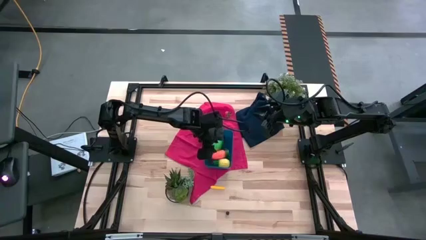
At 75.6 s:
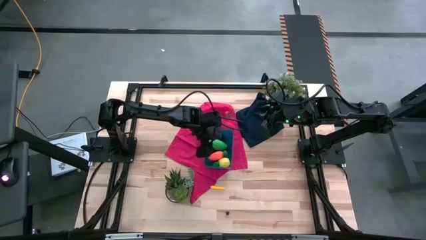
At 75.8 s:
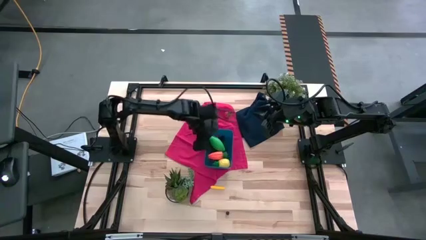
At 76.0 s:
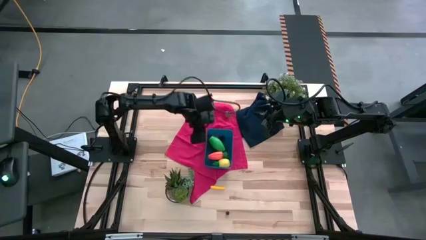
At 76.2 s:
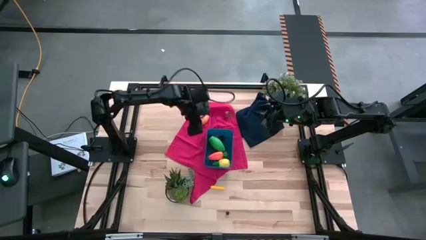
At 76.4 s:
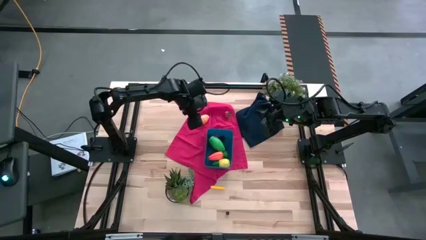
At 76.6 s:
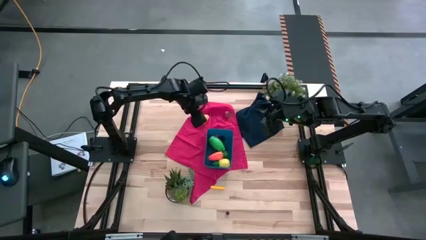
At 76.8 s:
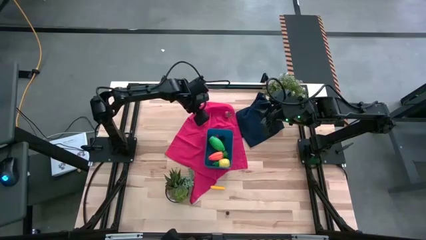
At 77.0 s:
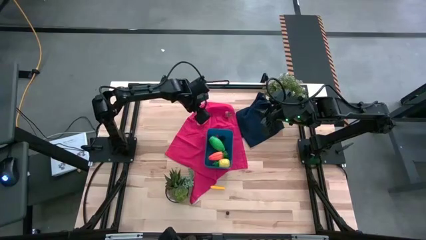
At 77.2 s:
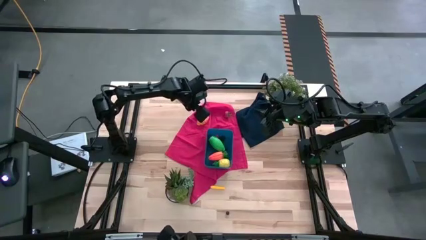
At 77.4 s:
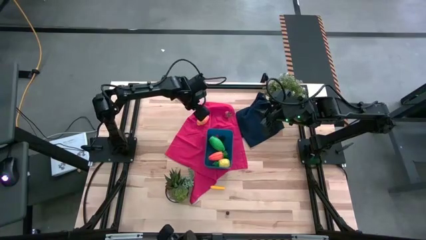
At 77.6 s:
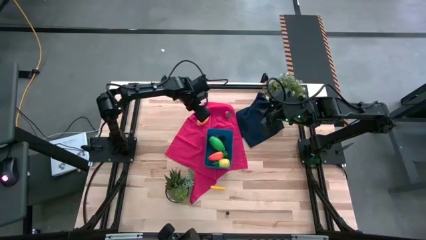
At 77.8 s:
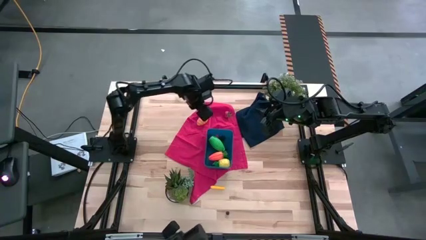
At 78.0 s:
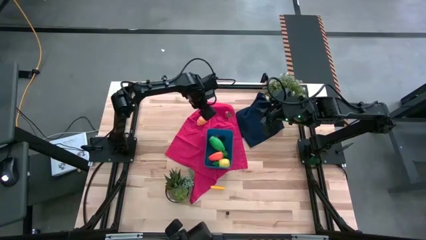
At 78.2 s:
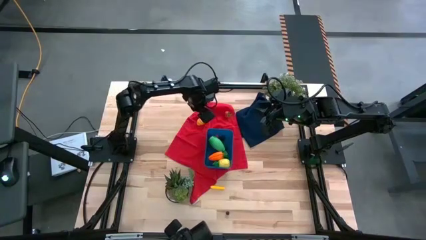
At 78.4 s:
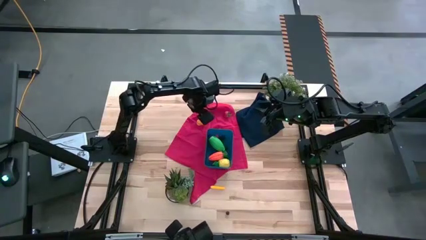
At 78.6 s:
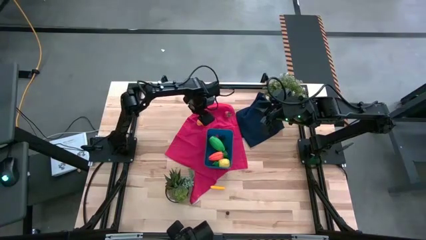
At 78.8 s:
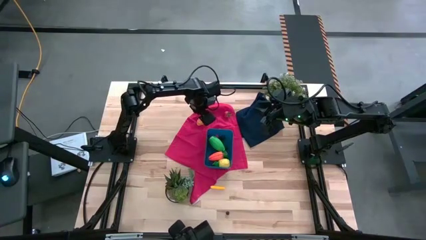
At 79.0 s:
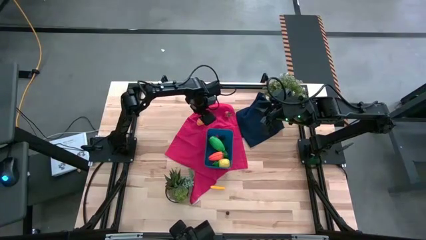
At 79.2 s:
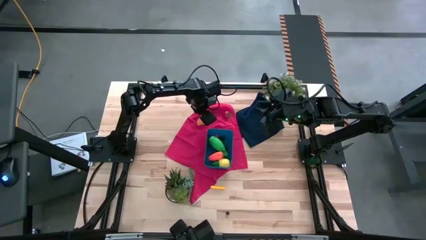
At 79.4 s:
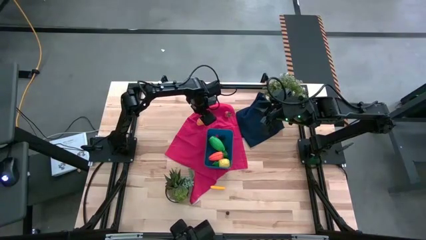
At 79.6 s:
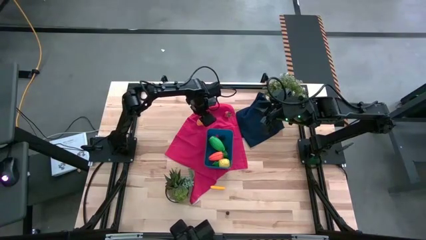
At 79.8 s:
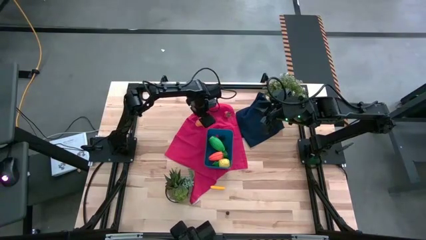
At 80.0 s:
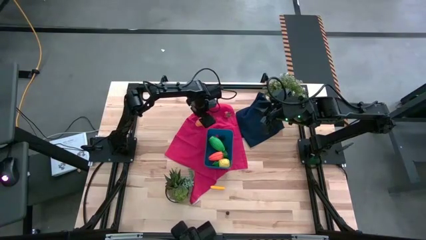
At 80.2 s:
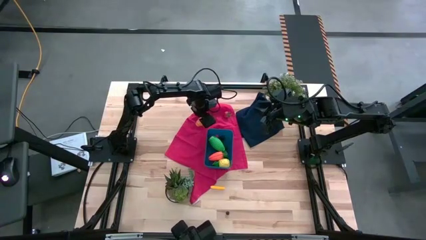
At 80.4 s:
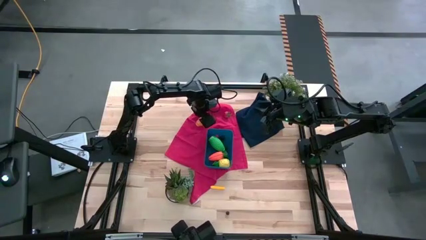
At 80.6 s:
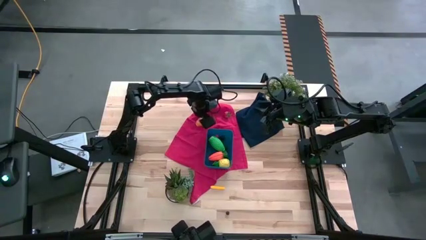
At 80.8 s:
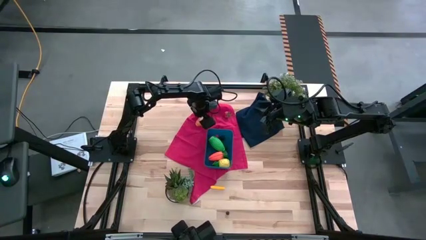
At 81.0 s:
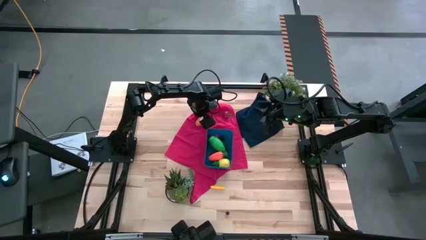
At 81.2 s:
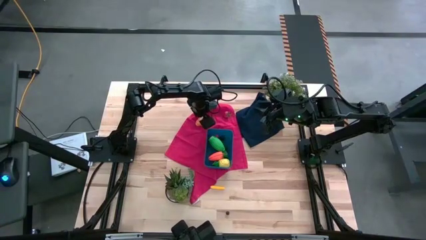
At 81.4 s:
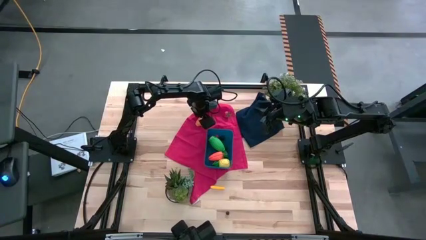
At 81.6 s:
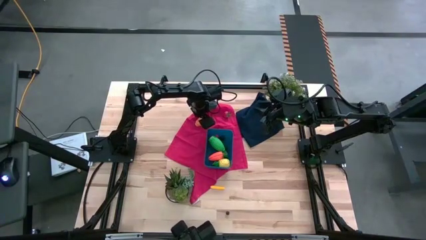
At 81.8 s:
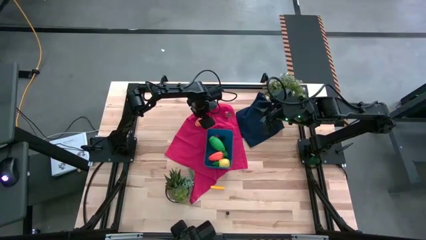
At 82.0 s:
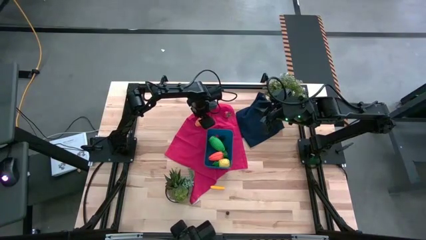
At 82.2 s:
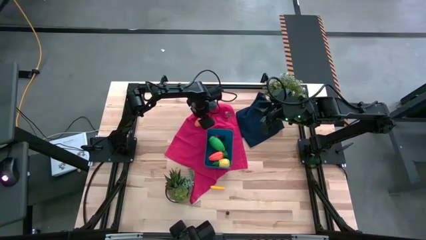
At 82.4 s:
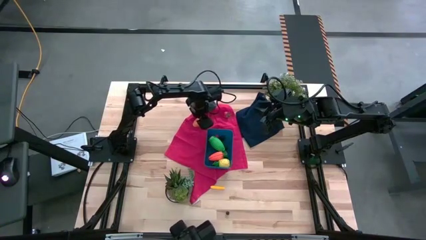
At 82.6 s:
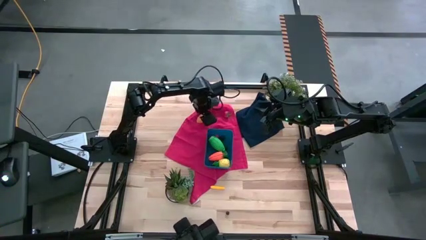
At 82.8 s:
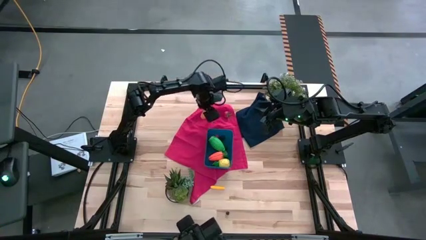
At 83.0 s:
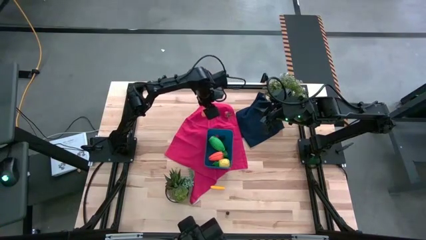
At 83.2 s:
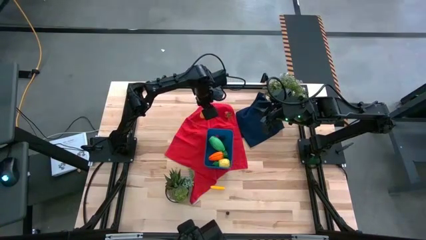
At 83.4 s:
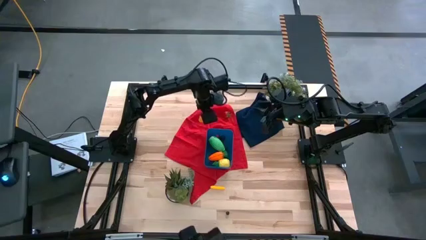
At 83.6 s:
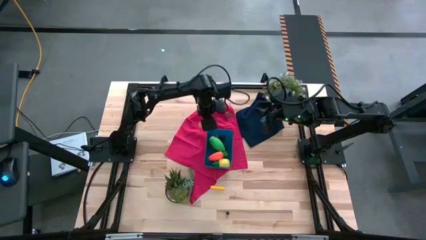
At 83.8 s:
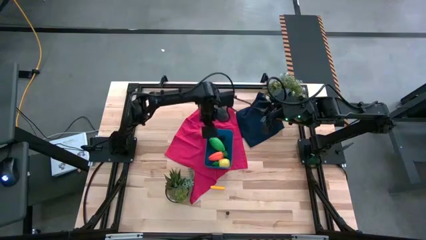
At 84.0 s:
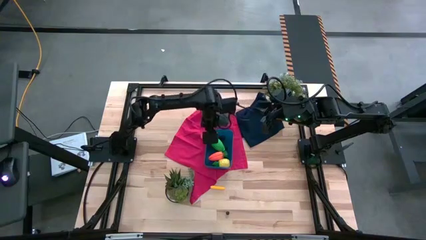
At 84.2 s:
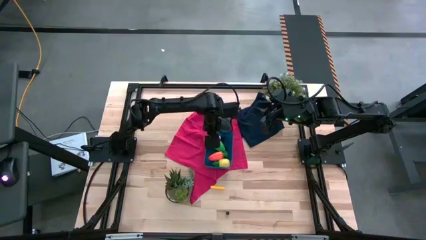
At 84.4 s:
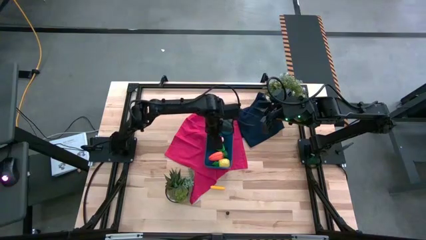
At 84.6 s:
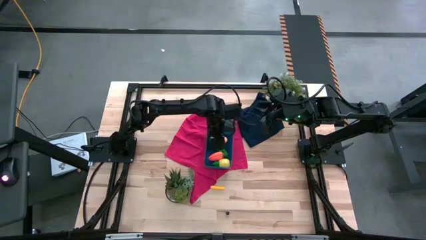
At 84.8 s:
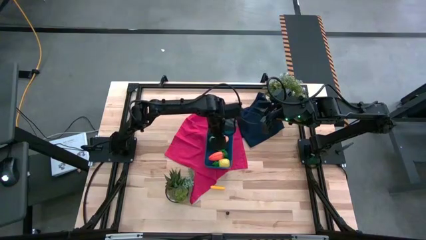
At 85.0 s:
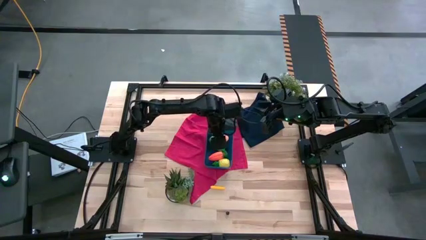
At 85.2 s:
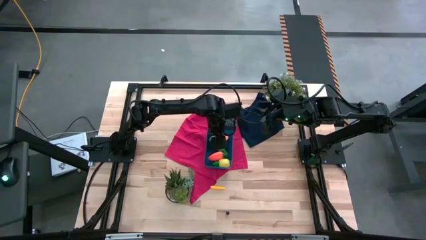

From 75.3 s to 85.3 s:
Task: Pick and placing Produce into tupperware
Put the croissant into the blue bin

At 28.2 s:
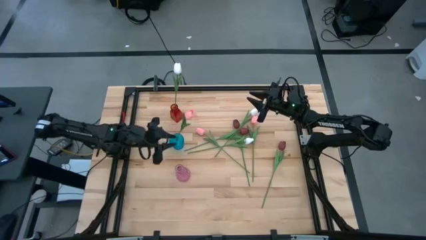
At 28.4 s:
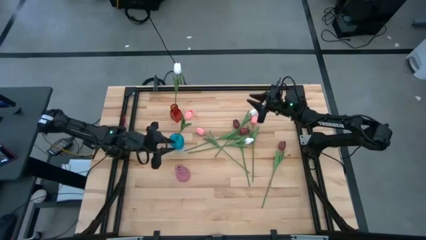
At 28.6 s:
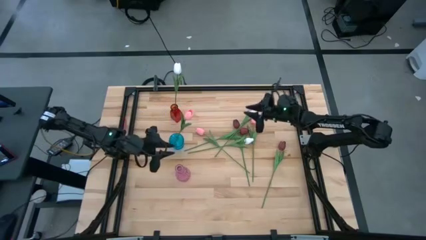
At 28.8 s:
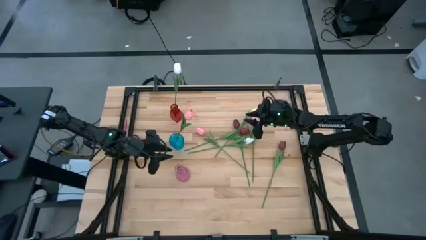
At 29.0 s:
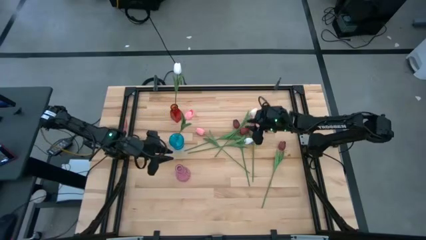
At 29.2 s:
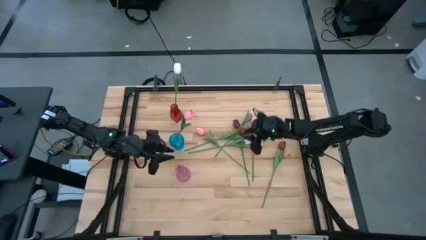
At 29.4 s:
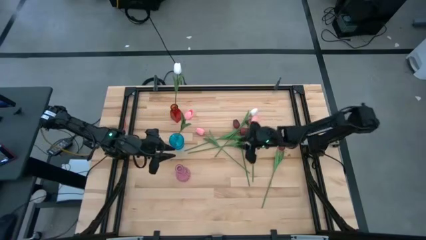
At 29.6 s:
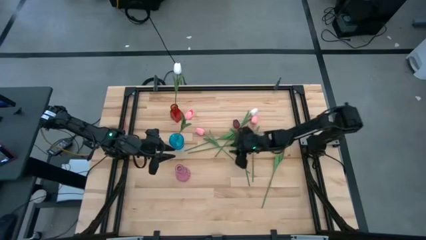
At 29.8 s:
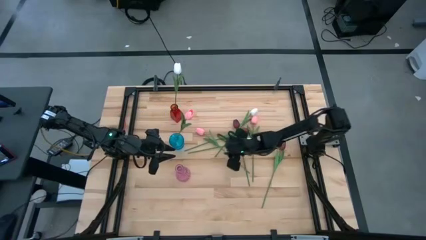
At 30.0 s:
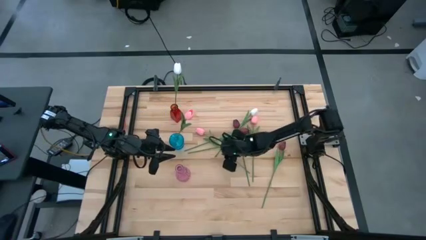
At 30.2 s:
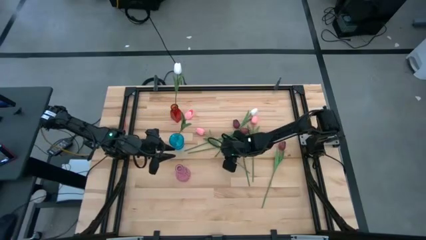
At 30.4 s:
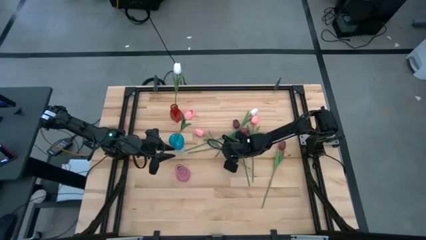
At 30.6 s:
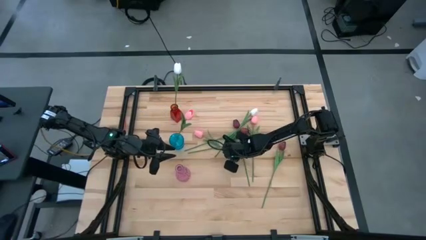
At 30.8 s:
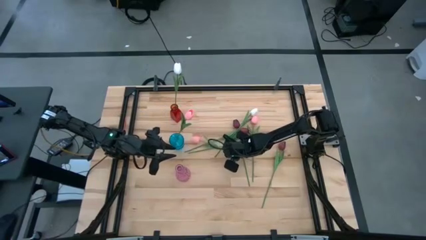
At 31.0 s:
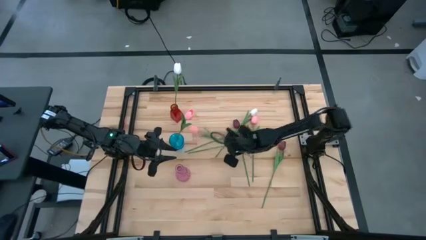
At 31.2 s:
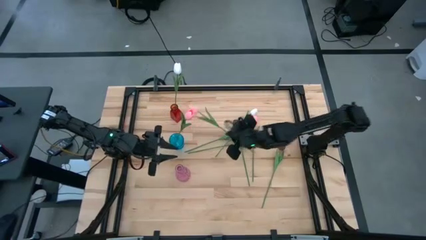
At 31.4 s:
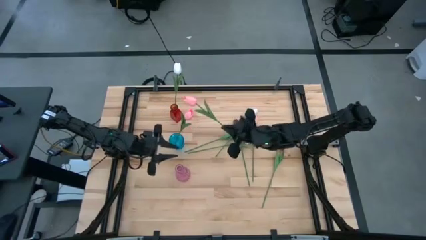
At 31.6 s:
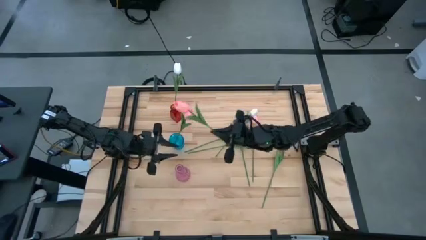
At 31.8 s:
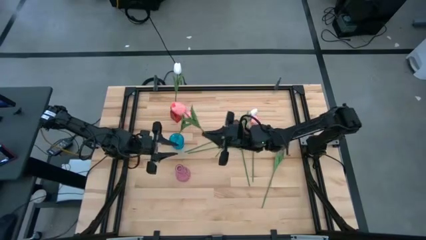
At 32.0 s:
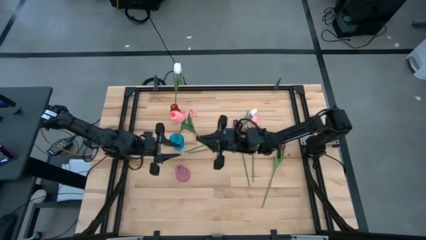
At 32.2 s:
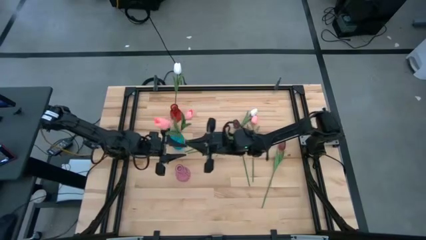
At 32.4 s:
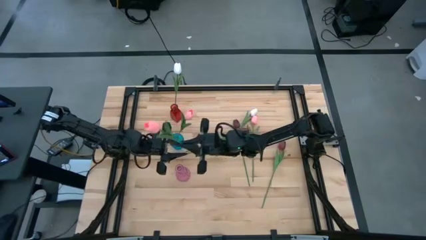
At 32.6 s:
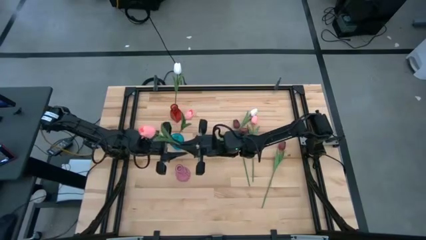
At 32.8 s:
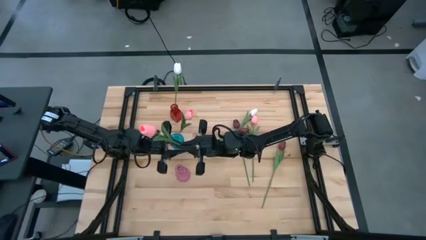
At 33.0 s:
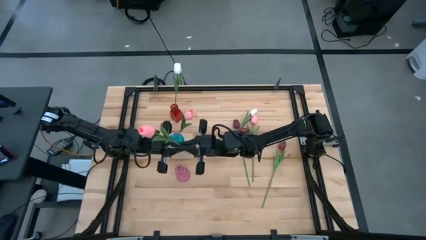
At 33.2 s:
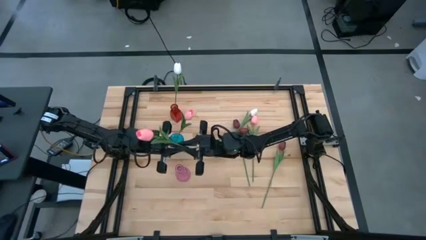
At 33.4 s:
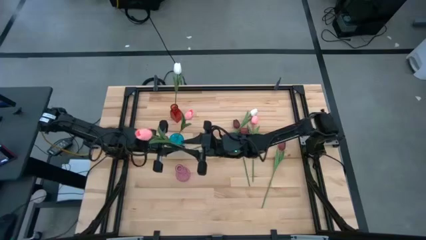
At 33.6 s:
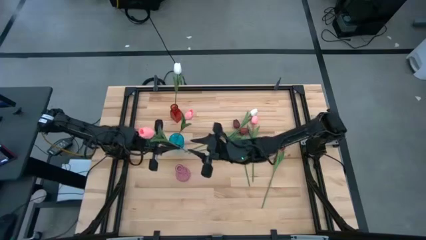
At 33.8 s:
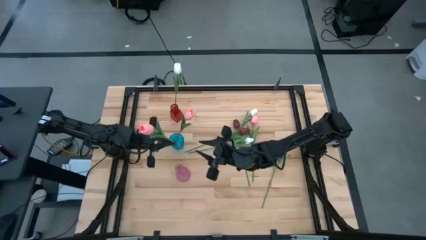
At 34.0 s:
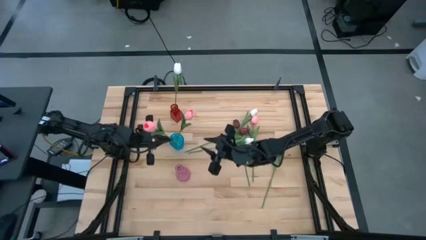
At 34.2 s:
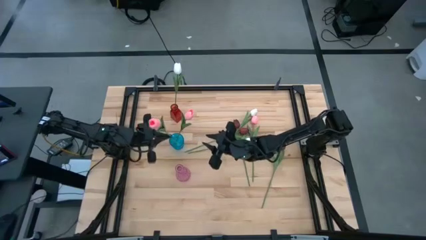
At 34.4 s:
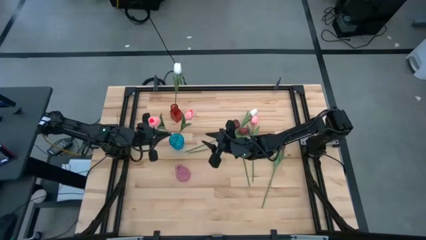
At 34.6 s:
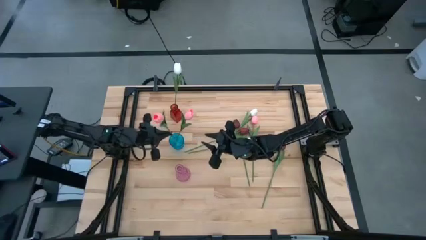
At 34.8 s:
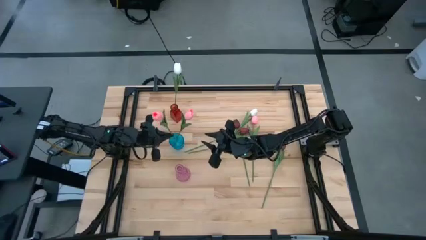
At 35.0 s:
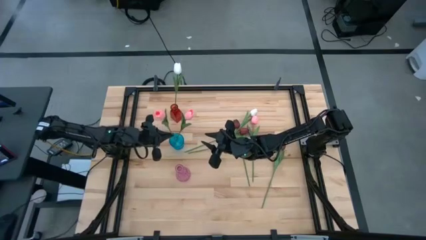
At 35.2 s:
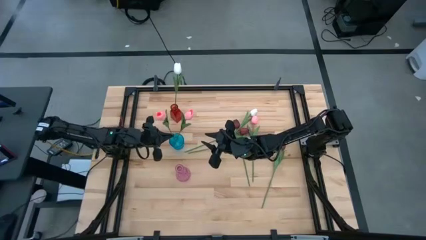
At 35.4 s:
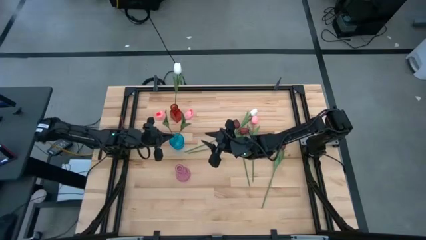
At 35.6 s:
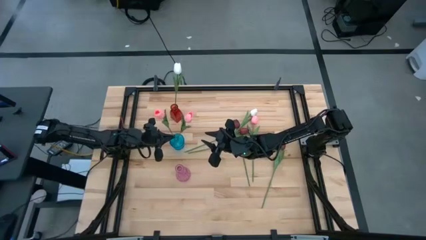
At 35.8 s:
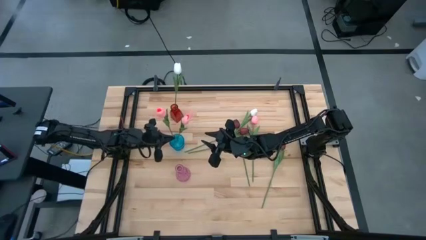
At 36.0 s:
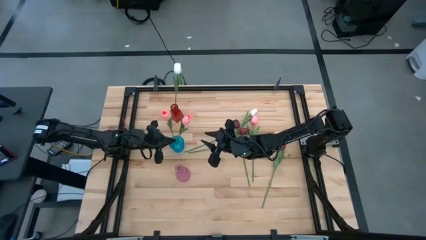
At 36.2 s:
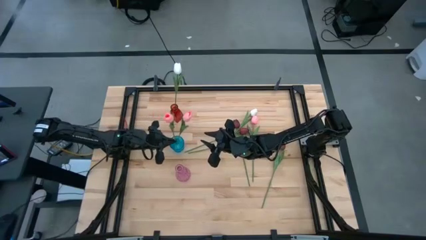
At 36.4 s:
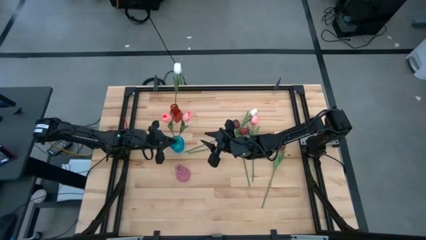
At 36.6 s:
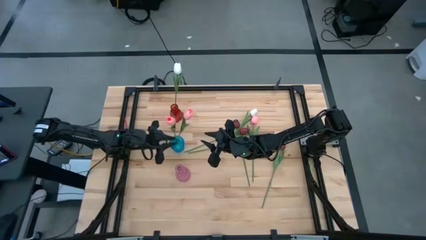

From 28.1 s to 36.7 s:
Task: Sort flowers into vase by color
Put the left pink flower into the blue vase
